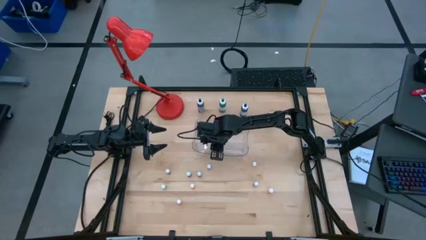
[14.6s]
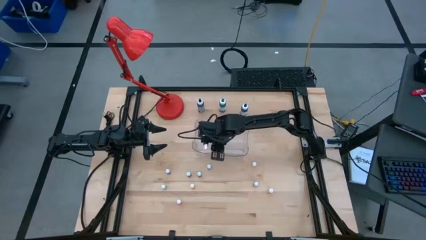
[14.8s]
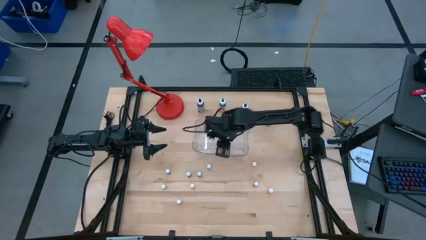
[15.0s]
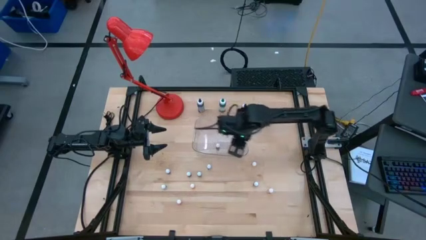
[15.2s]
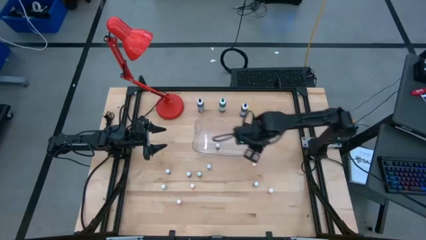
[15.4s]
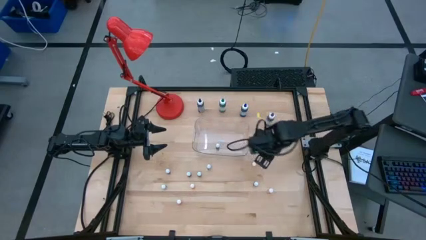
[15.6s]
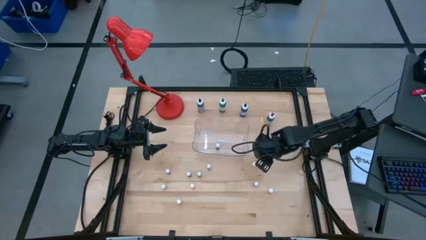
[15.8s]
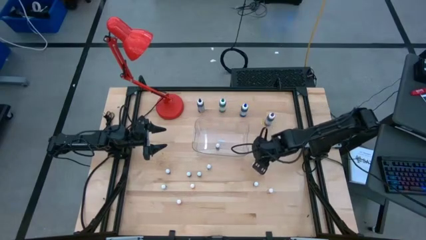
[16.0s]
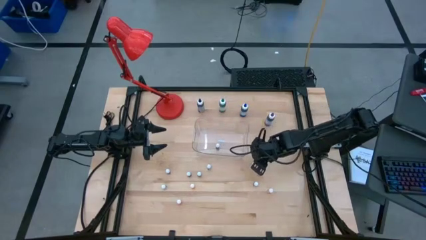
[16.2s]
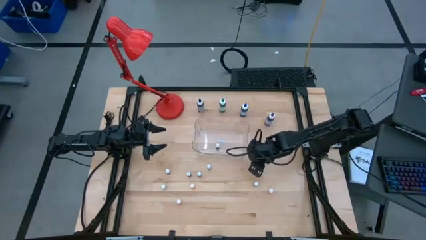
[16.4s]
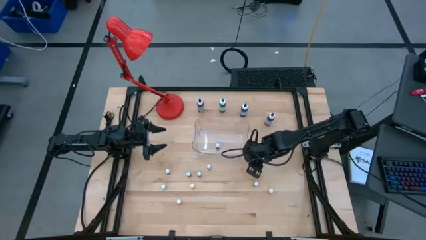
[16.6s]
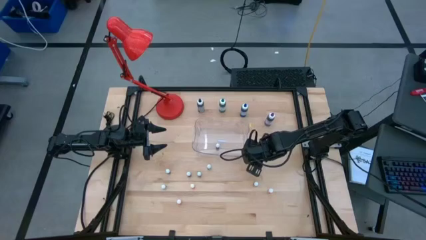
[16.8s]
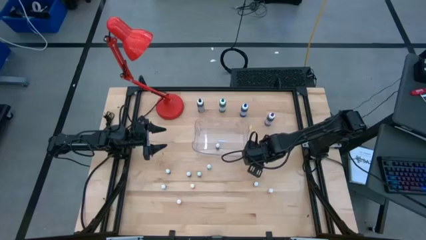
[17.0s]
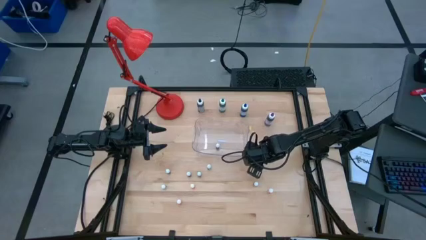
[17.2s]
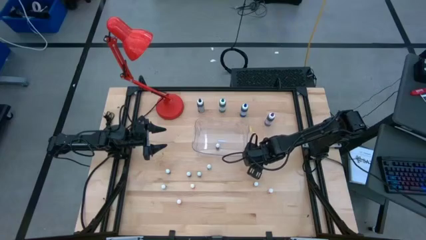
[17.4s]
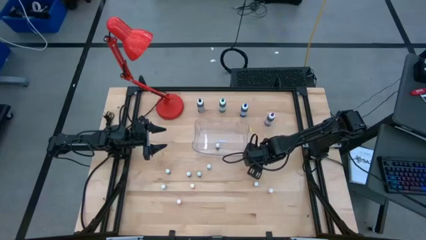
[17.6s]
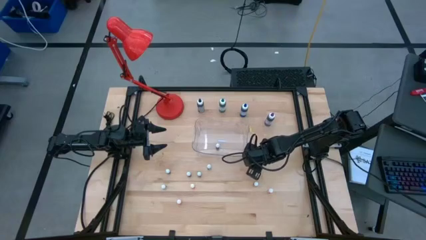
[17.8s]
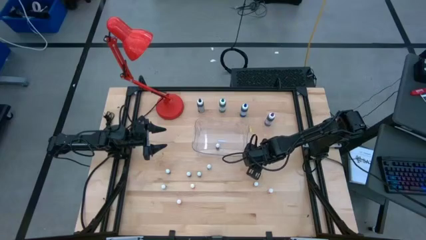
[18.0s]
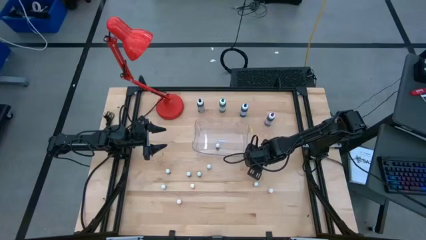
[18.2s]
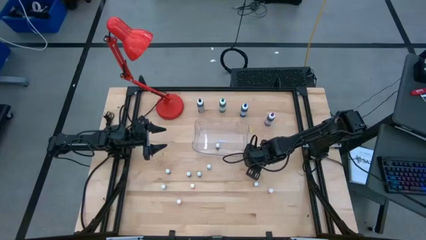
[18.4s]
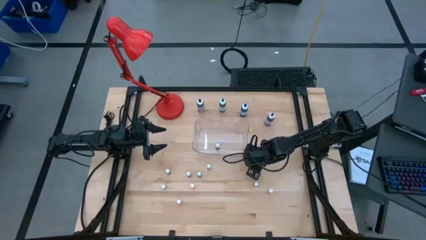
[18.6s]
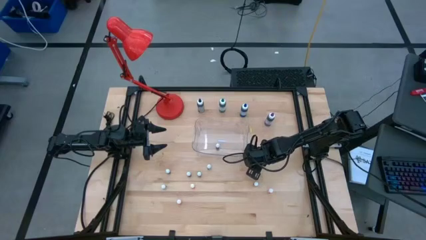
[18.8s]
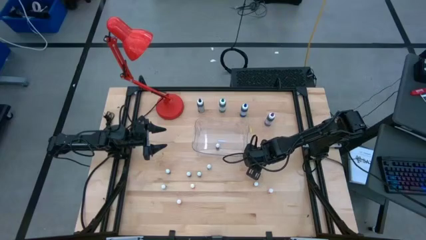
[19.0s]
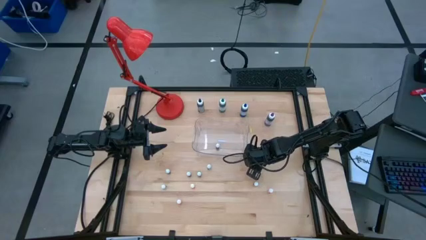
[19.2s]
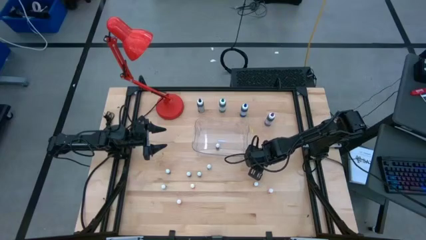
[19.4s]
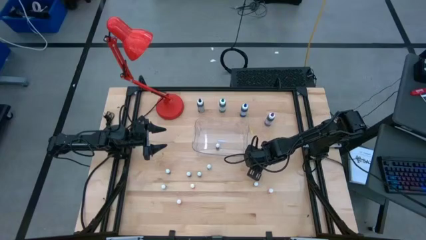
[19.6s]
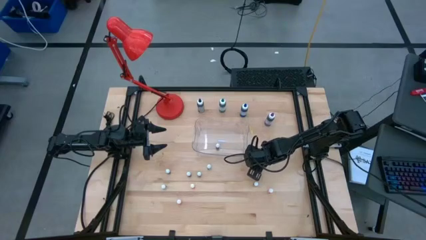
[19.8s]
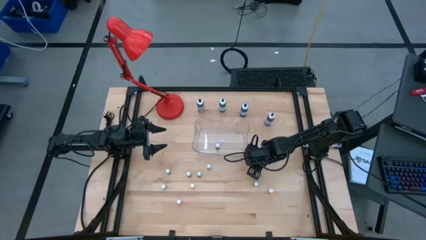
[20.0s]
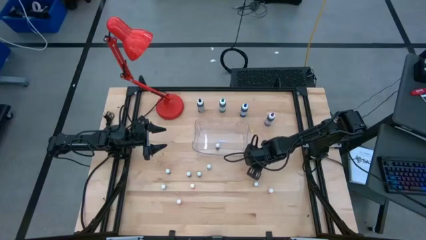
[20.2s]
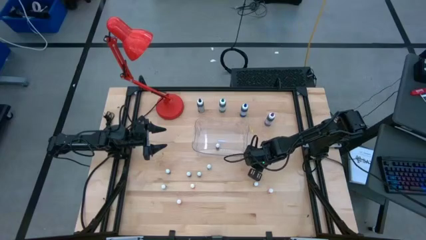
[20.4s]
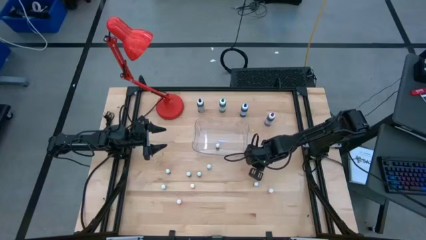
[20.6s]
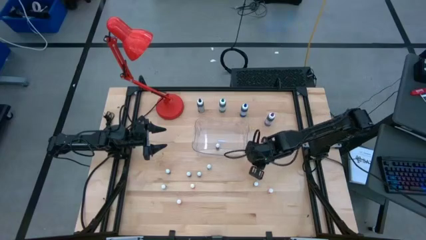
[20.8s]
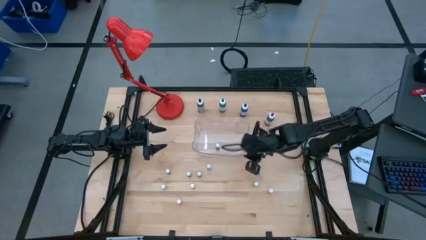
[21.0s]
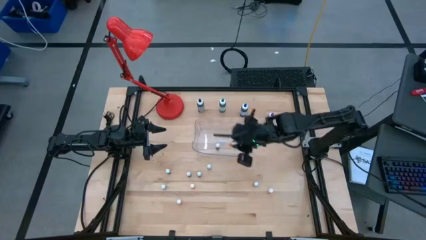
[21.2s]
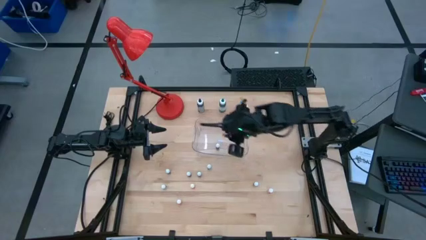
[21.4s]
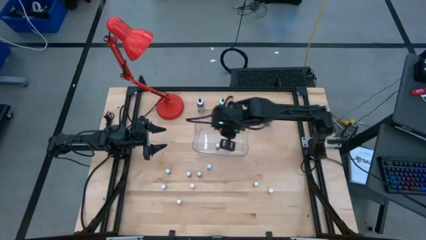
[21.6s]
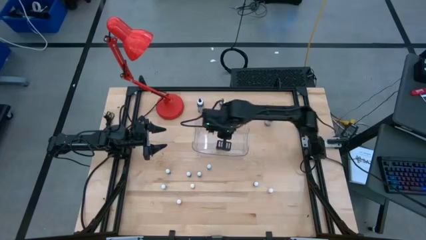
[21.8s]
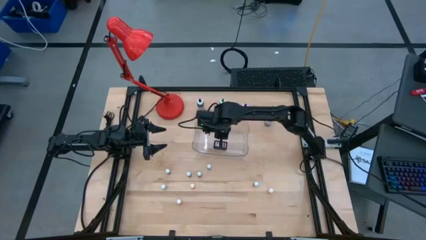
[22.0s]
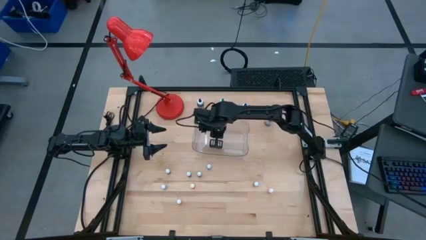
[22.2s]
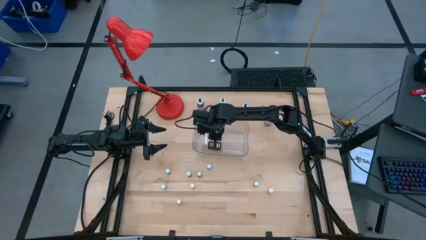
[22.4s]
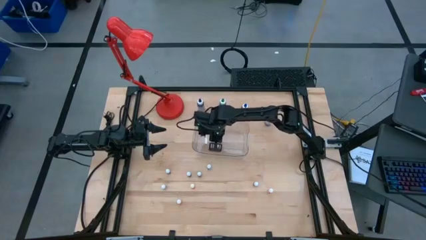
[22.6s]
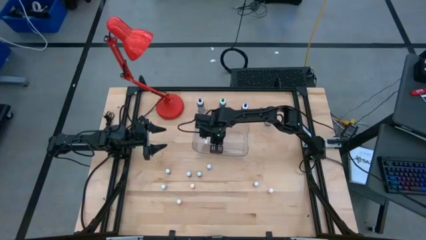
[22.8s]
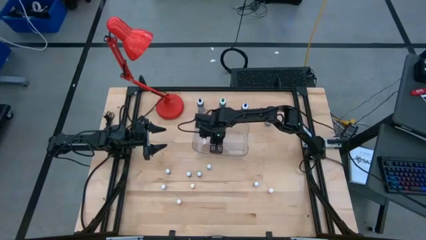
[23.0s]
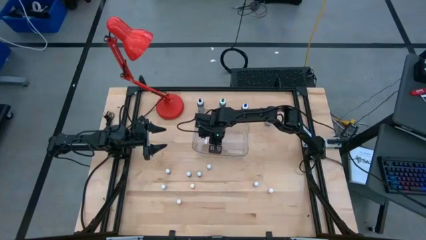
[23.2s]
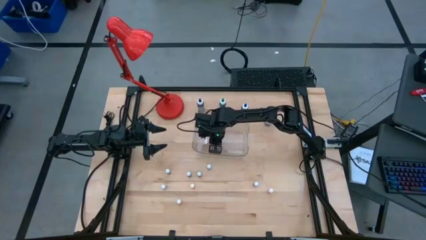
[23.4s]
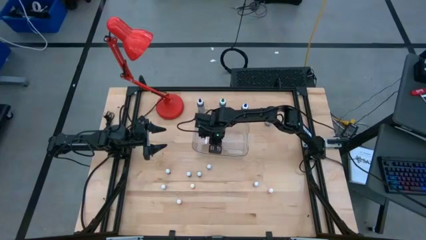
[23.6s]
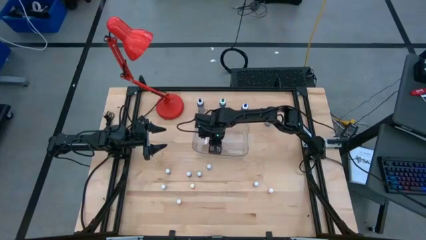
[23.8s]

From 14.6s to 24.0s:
Task: Pick & Place food coloring
Put the small orange food coloring bottle in the transparent bin

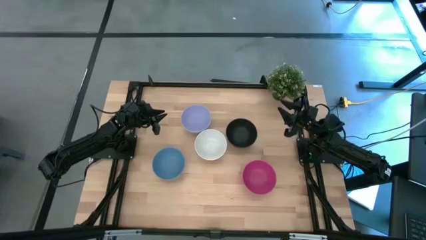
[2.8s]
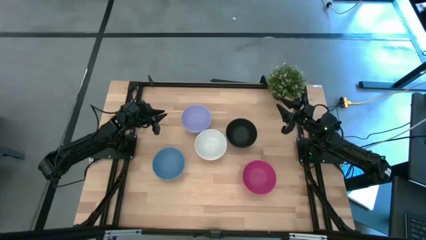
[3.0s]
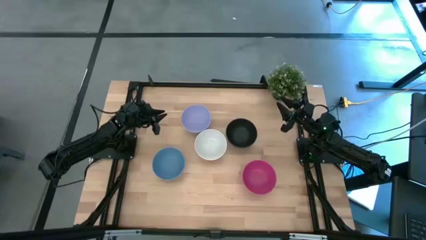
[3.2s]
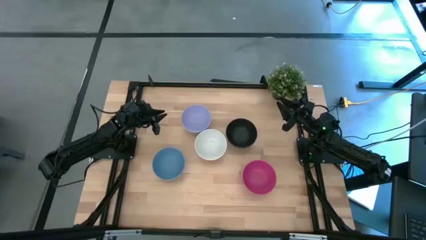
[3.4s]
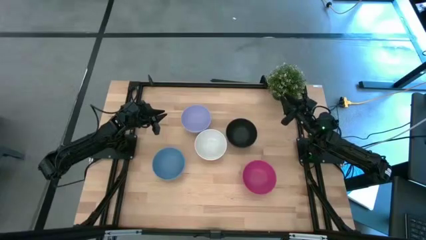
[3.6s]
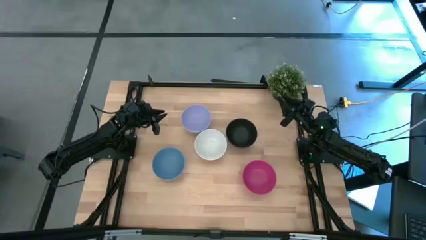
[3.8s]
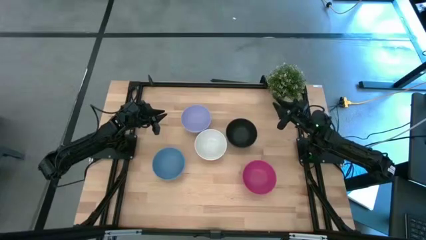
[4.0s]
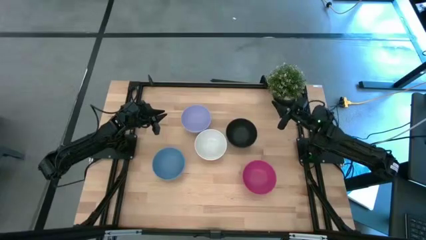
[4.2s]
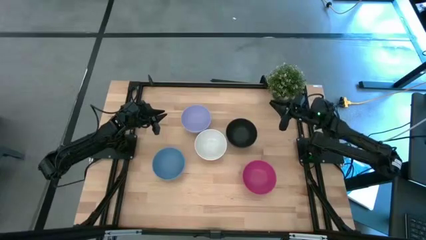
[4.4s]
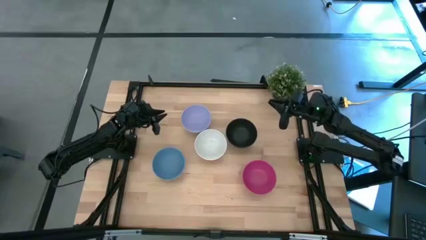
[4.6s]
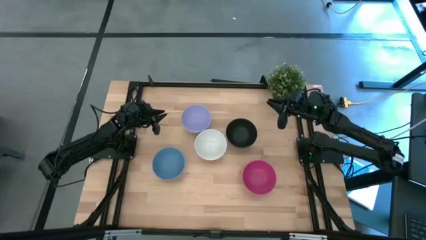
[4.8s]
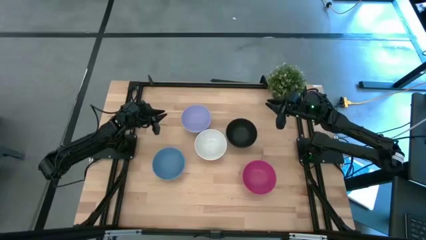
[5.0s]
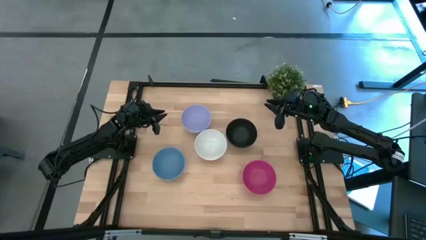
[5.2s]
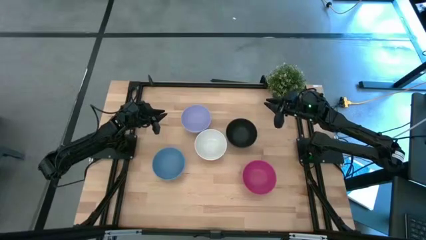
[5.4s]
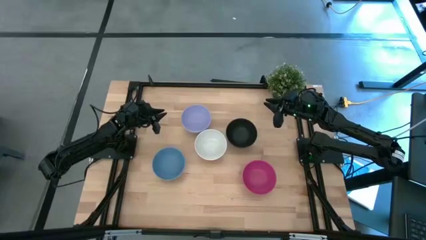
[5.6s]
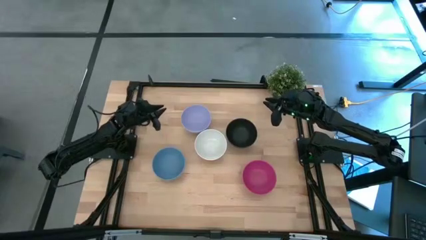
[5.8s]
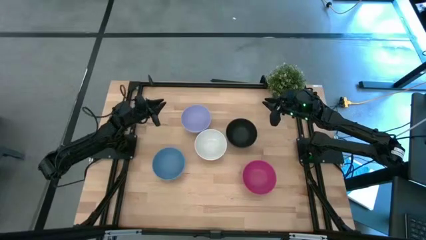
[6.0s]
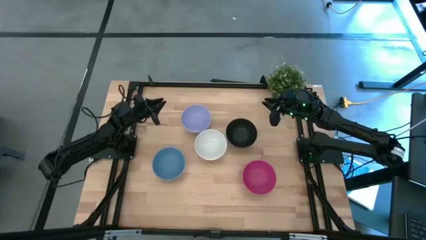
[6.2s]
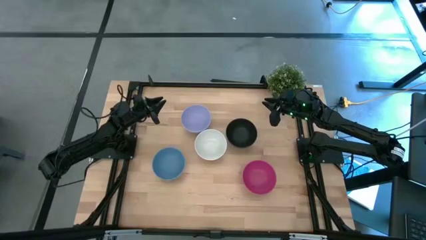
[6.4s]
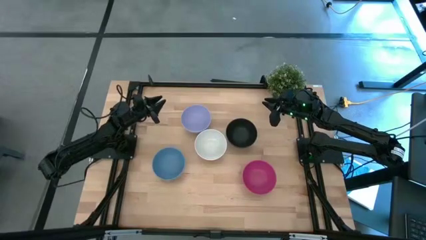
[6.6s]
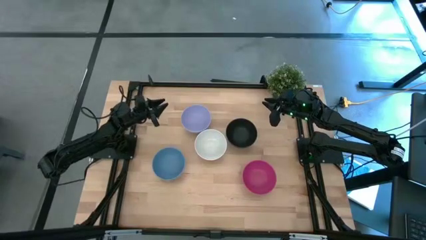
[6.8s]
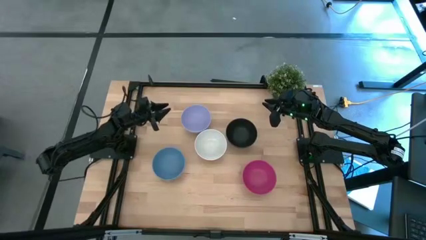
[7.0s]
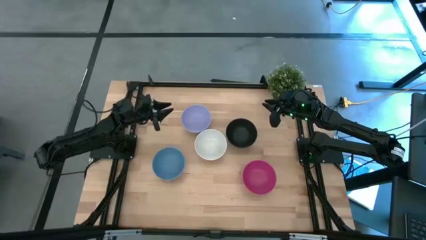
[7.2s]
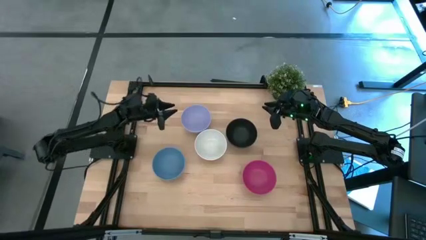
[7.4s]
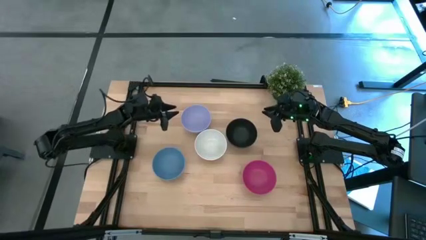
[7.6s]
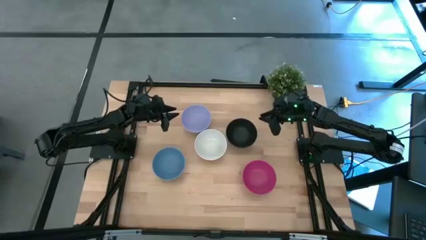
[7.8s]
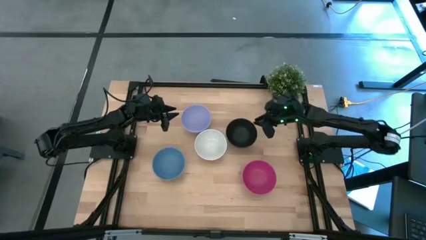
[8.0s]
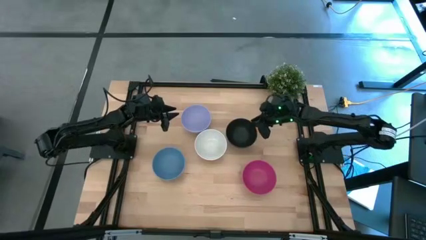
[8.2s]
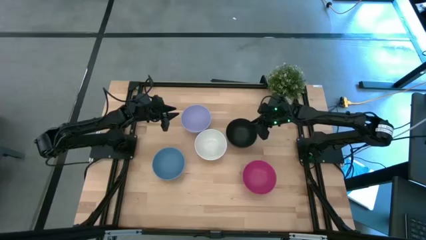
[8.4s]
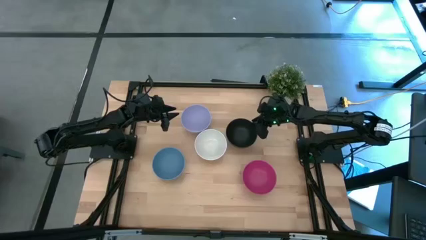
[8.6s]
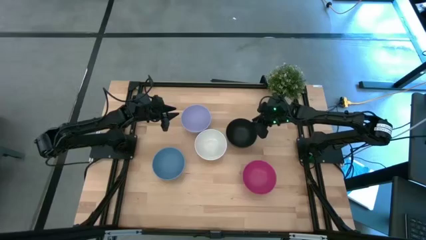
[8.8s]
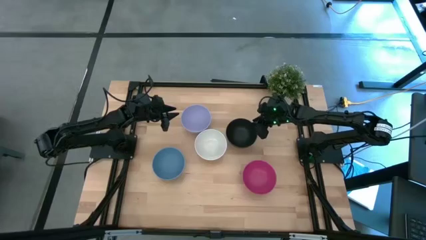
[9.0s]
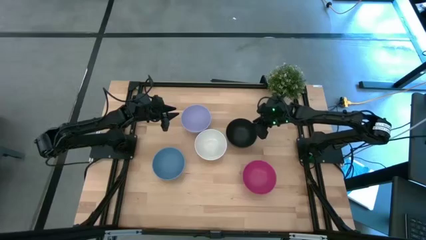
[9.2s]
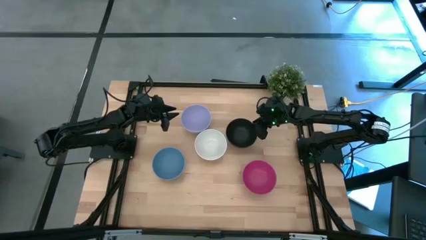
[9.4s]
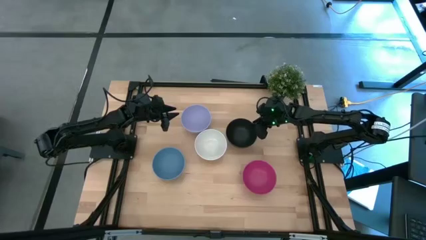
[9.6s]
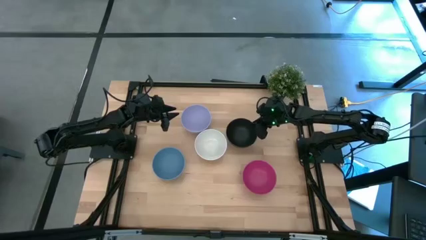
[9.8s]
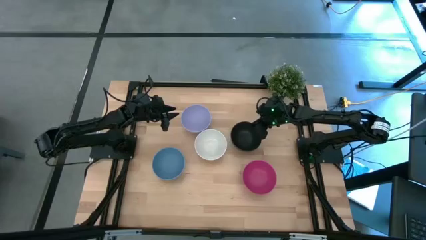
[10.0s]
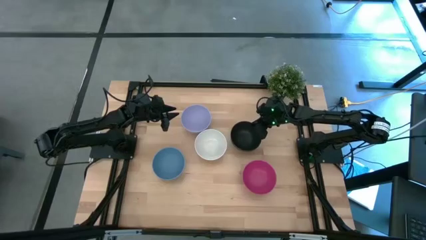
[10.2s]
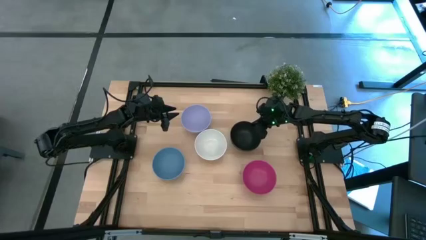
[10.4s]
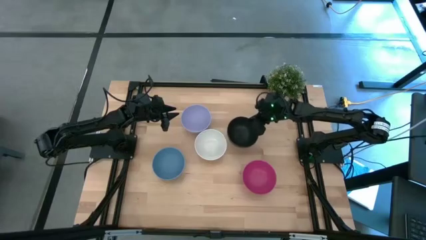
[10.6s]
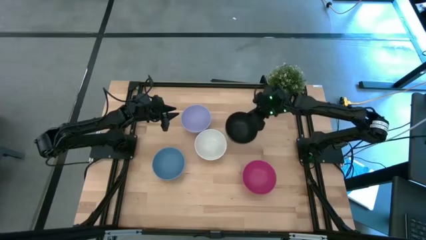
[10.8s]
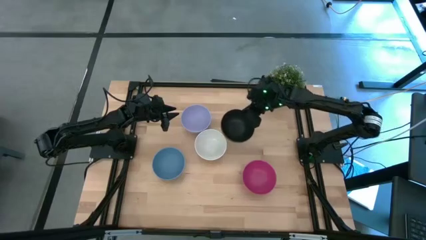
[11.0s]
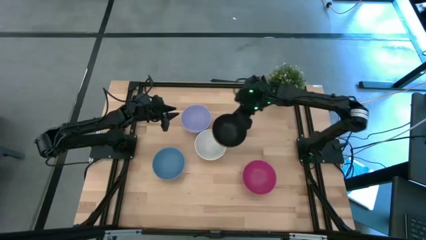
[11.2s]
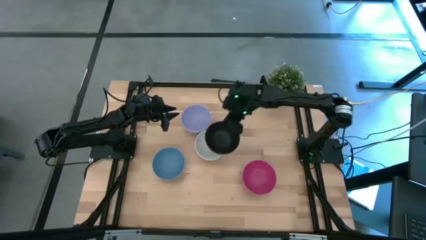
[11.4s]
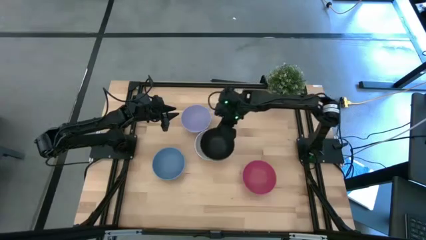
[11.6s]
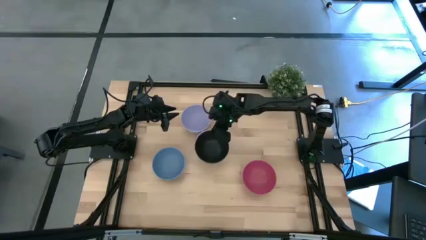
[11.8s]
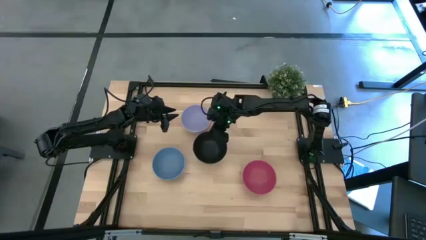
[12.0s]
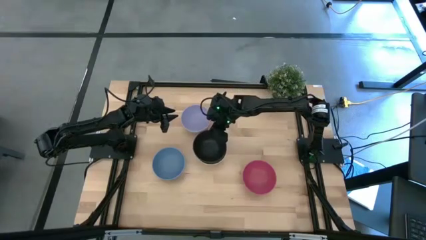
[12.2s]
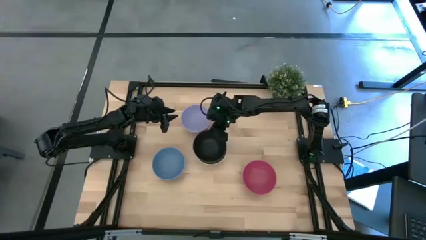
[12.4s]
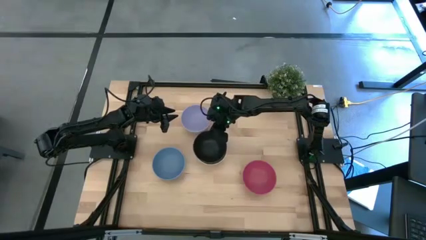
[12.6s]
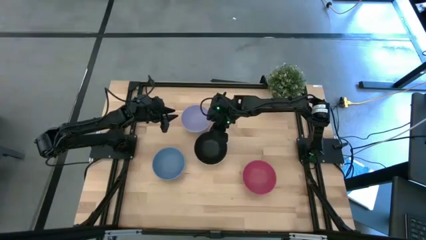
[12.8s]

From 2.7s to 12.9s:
Task: Nest bowls inside each other
Stack the black bowl on top of the white bowl
